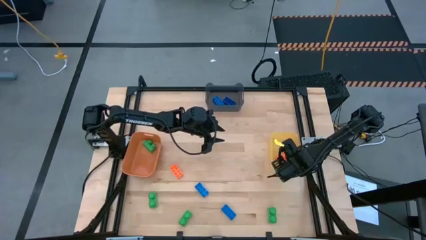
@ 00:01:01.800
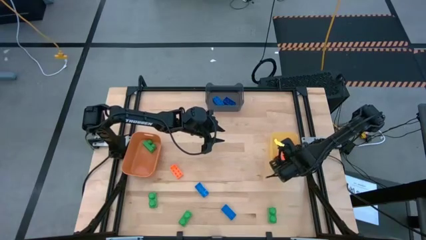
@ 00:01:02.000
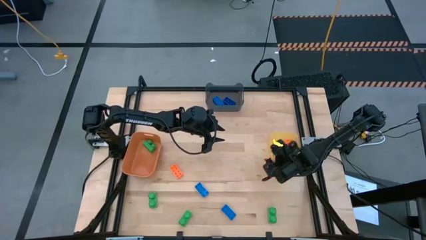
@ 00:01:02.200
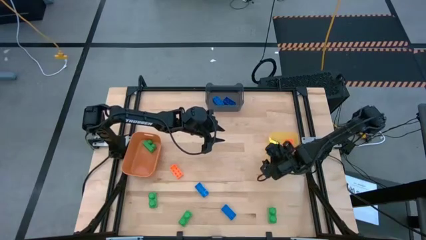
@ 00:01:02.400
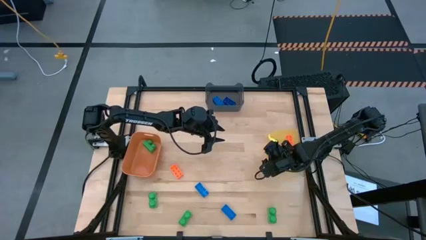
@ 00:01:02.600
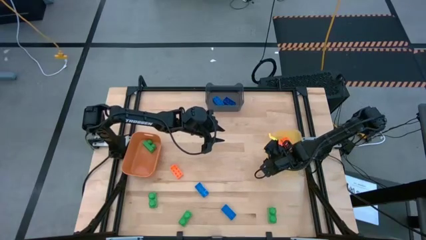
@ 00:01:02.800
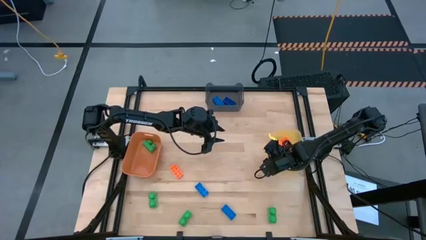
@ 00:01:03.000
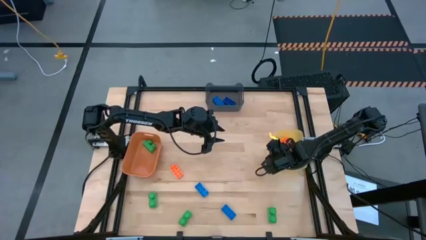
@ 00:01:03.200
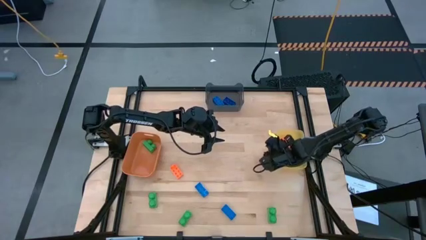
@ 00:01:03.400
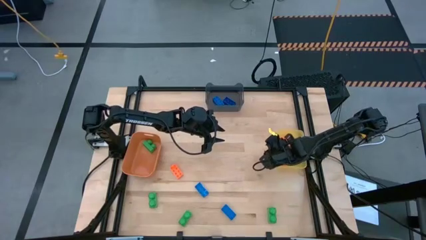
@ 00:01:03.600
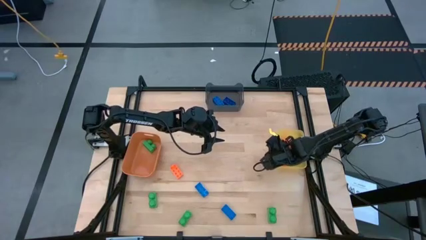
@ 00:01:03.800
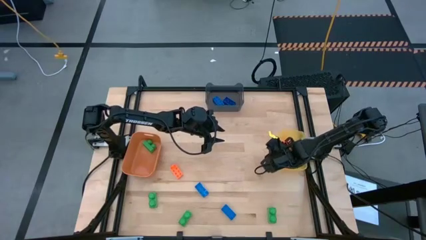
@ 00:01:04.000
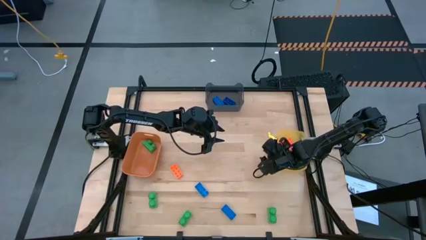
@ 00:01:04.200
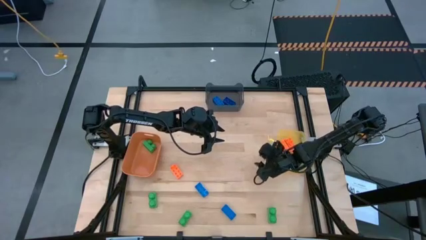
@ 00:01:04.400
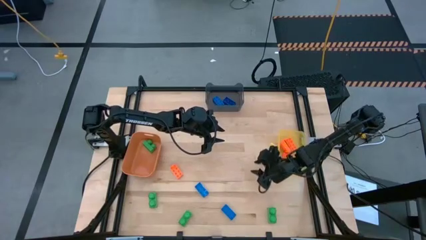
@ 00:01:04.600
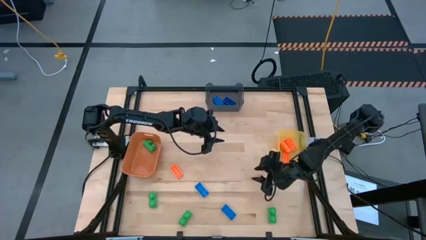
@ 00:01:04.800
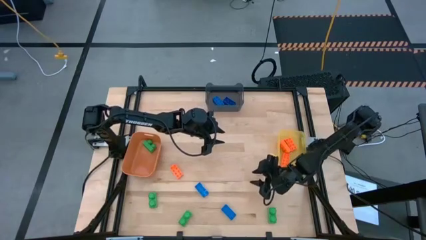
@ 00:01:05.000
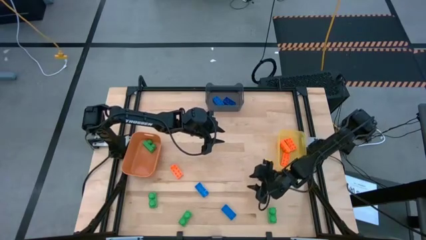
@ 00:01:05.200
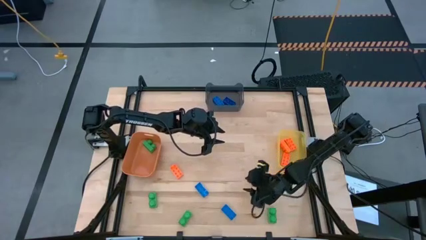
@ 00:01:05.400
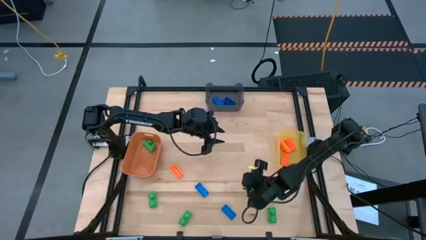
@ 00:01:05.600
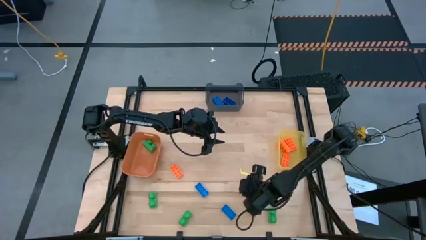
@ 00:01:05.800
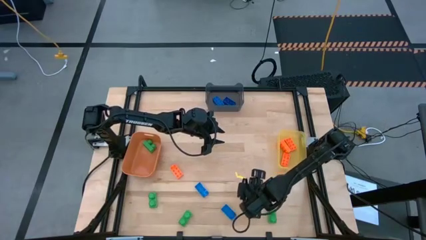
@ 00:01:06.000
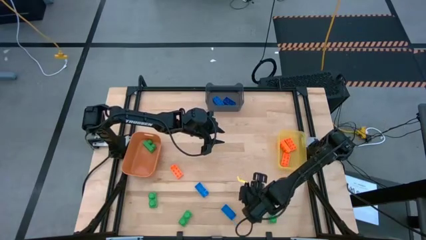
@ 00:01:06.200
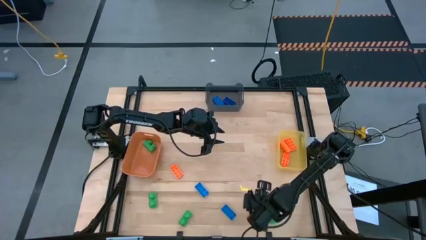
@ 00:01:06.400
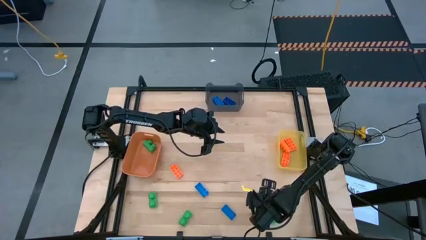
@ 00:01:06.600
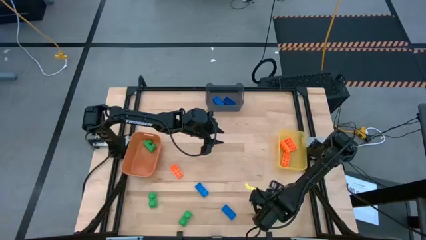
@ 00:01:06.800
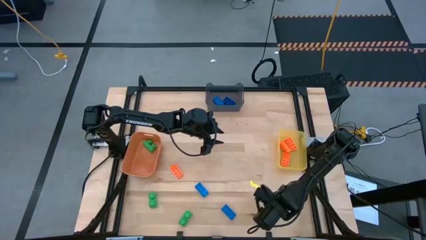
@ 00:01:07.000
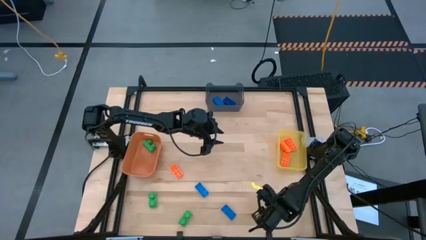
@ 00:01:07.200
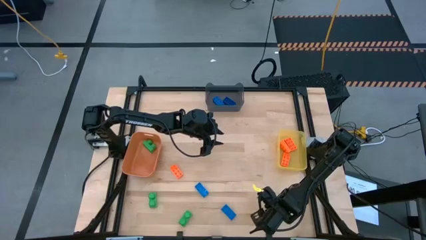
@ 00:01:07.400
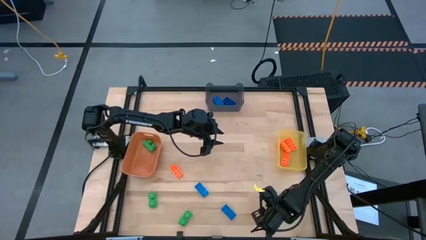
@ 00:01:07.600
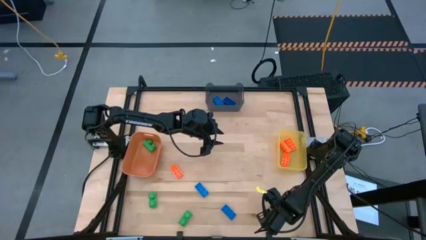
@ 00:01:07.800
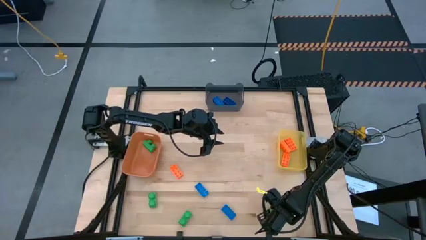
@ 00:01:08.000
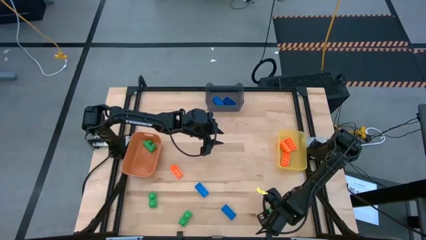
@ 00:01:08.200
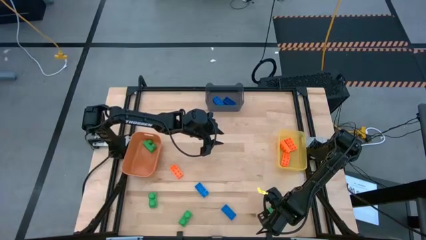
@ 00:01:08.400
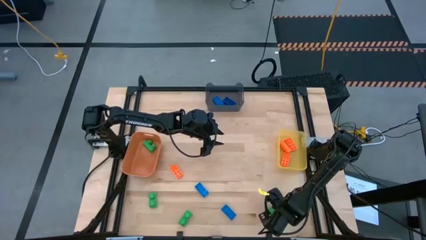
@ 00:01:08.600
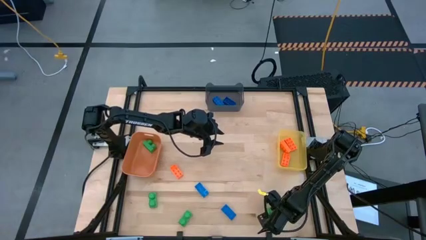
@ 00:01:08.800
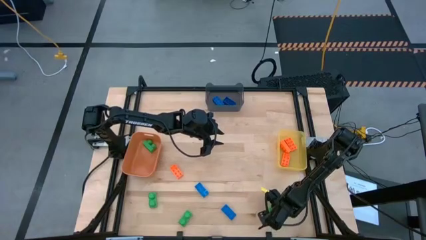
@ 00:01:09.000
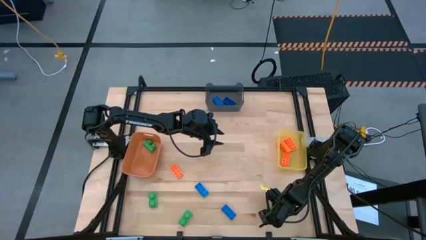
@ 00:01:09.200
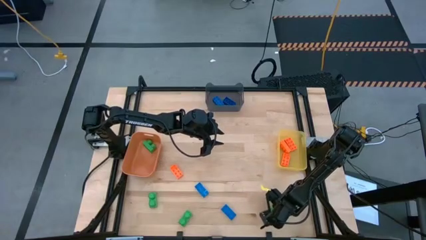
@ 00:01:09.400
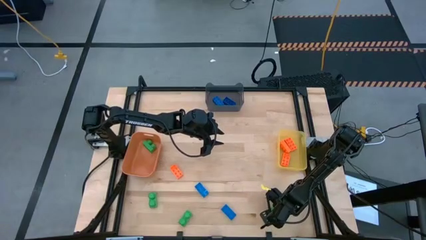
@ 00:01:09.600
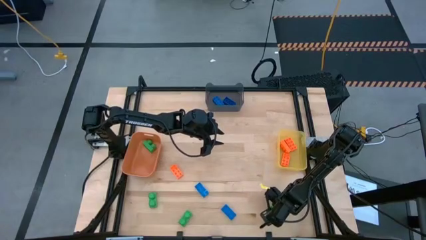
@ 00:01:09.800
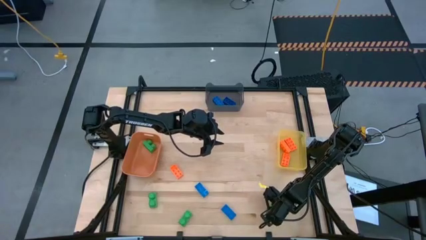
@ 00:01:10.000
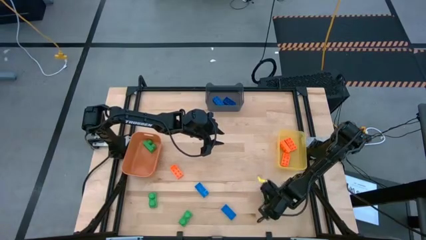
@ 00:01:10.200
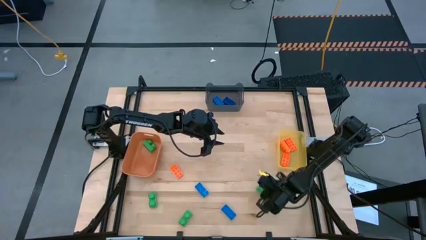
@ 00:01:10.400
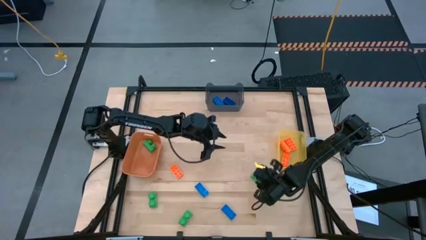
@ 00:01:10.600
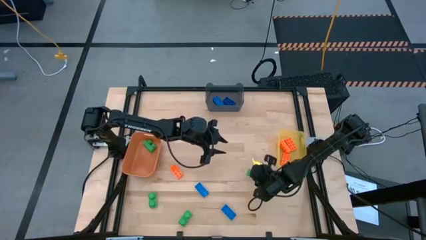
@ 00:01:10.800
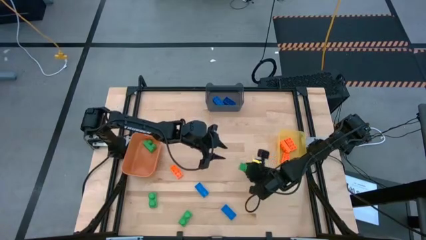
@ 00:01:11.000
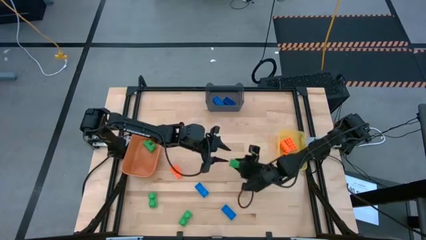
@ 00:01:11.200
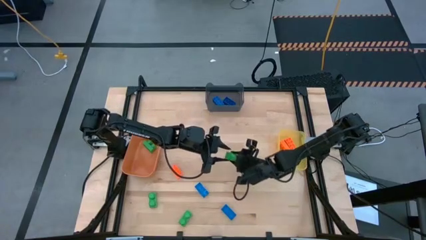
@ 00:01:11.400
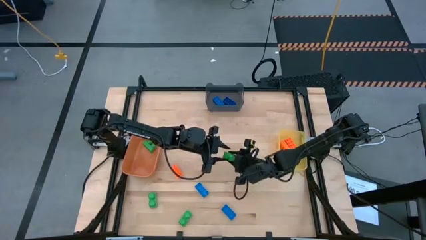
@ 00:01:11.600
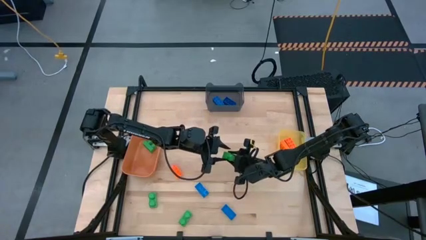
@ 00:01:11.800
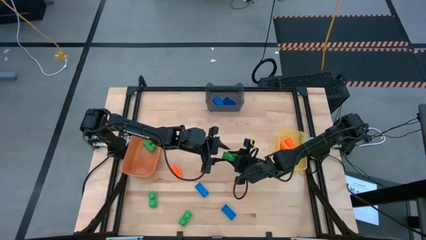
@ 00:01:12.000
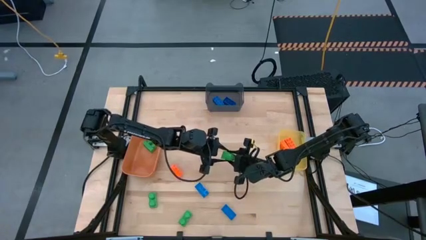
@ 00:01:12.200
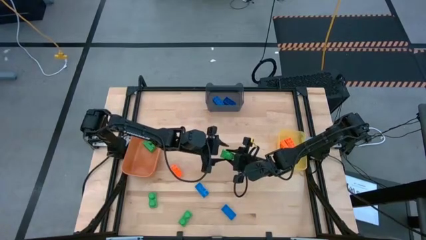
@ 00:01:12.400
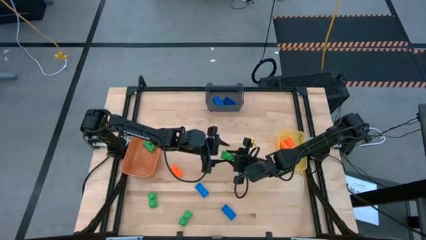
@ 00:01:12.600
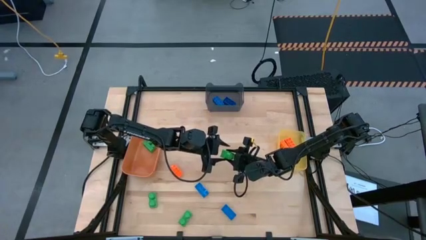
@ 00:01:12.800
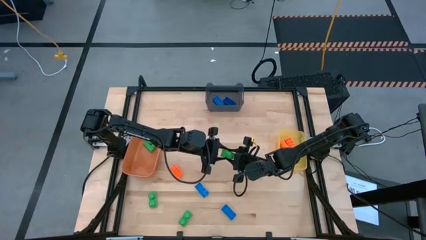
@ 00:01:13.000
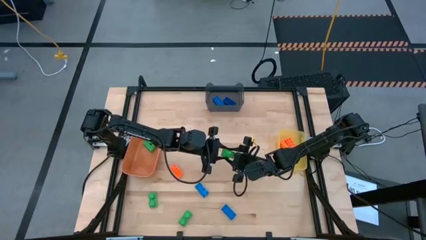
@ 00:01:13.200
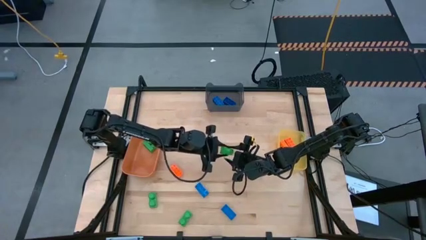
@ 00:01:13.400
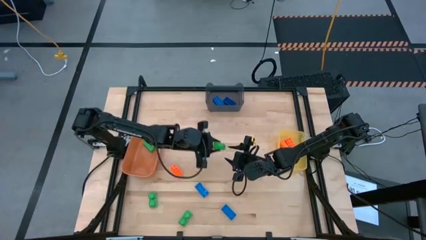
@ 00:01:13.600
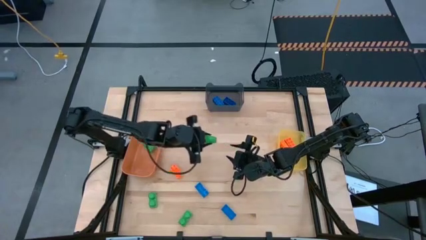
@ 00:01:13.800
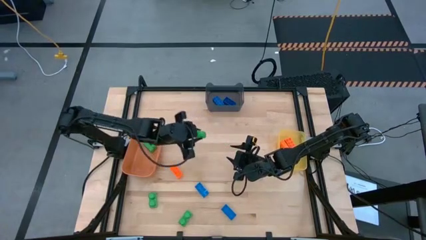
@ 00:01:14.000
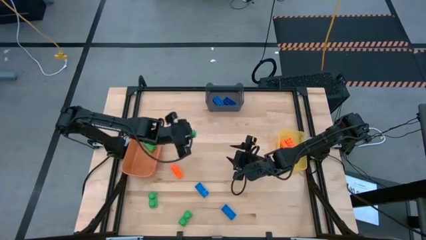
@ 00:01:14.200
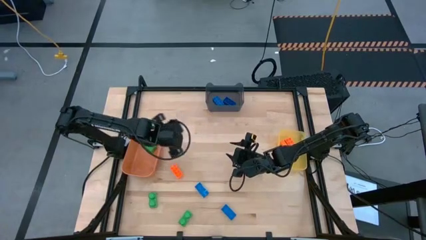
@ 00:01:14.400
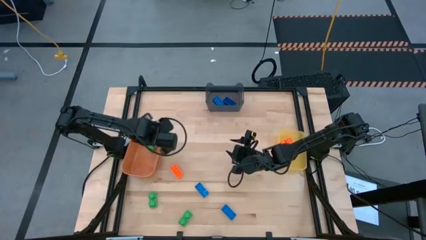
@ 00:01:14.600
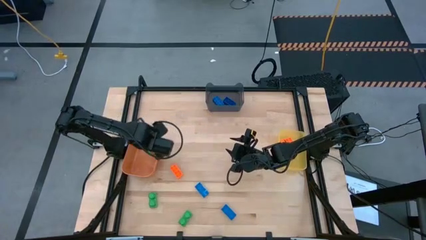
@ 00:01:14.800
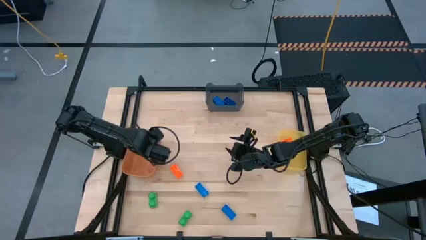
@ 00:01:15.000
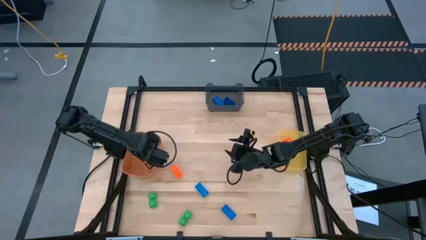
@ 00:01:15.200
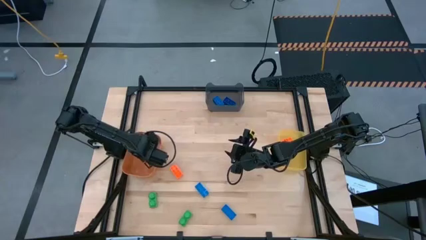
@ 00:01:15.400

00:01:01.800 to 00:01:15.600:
Task: Sort & place blocks by color
Put the green game piece into the orange bin

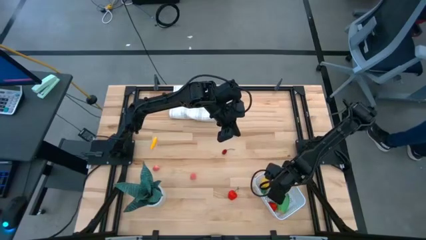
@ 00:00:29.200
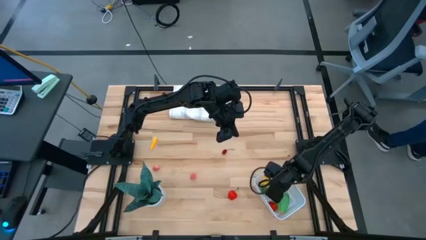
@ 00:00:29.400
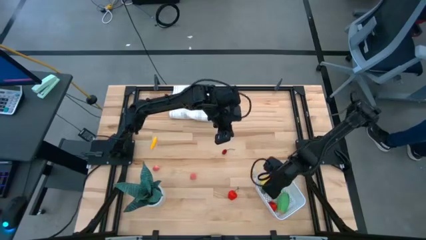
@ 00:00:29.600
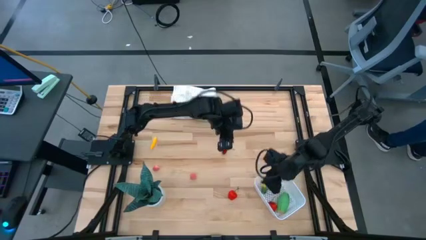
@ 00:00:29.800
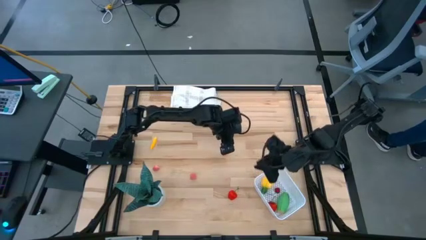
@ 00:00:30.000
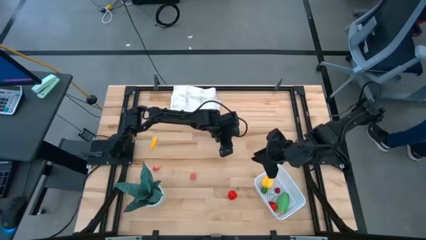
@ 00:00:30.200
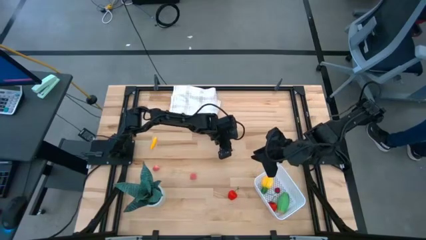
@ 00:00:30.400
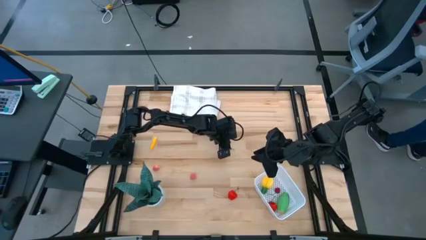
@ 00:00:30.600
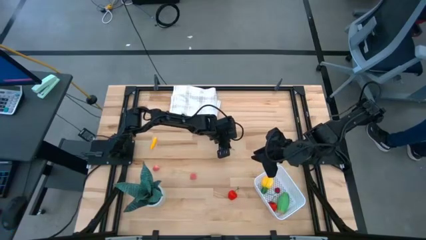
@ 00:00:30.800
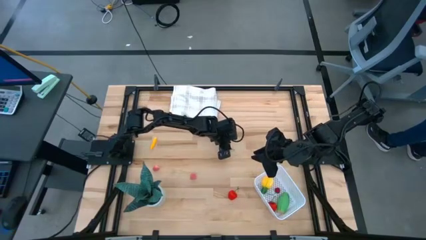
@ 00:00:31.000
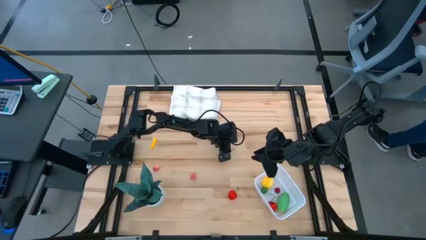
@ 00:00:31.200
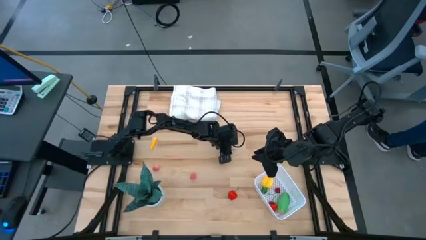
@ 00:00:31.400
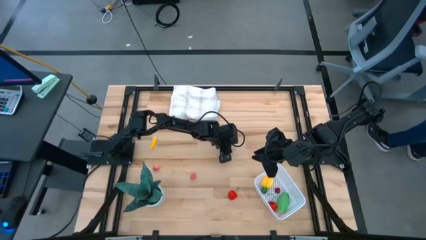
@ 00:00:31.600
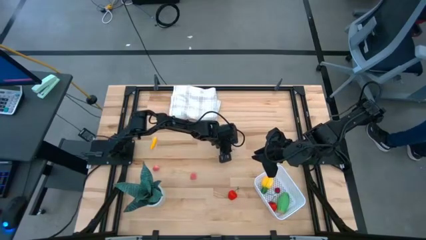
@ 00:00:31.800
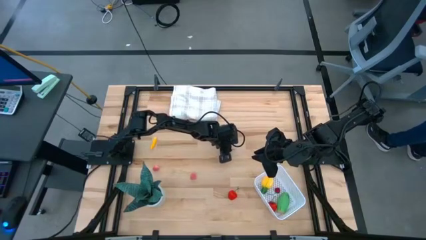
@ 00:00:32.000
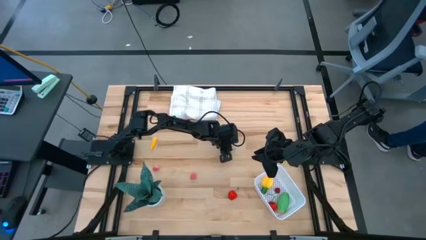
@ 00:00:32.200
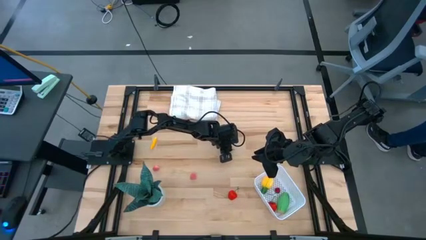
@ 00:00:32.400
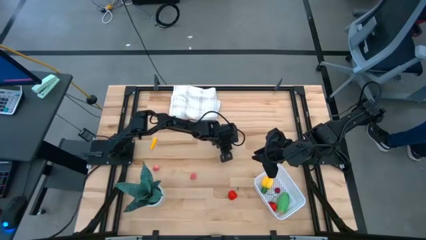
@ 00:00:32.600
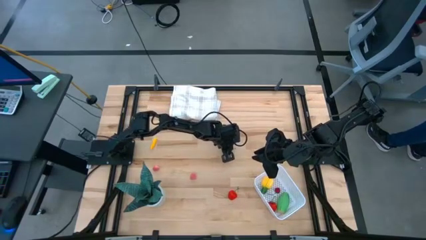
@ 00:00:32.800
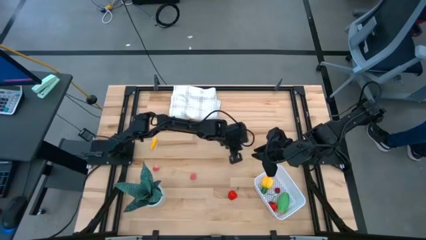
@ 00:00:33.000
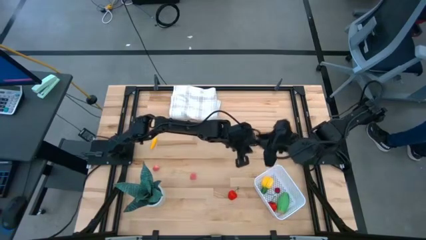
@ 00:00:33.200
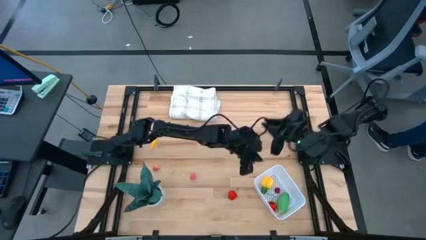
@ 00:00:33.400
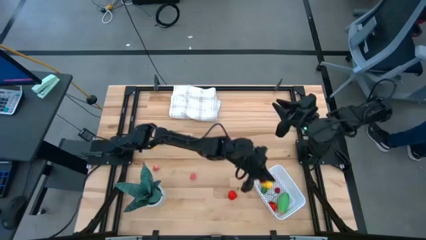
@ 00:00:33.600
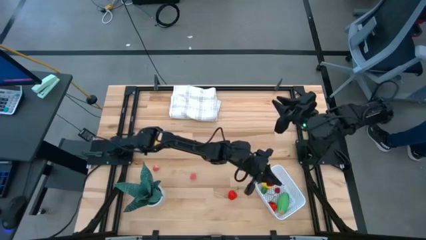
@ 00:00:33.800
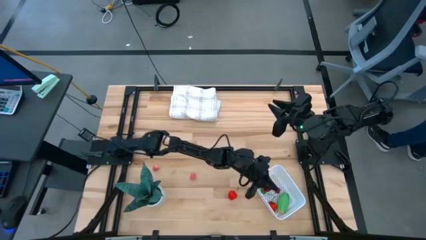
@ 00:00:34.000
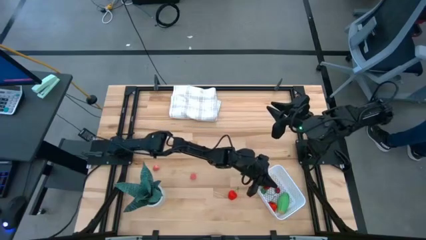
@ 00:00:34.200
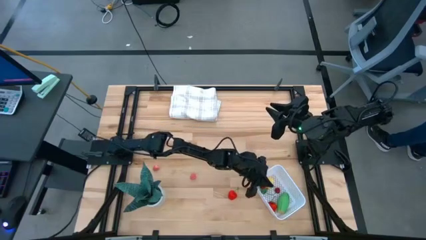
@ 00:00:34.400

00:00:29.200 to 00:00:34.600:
Task: Pick and placing Produce into tupperware
Put the red cherry into the white bin
